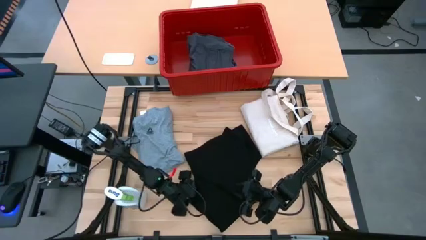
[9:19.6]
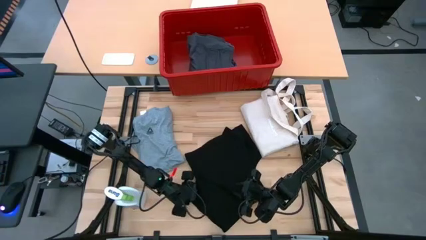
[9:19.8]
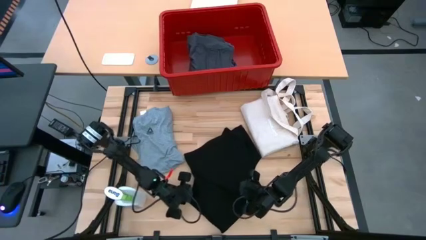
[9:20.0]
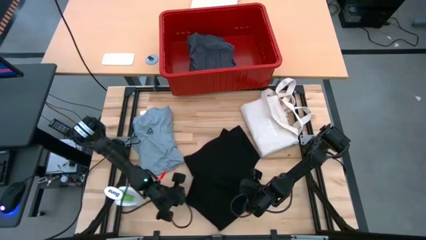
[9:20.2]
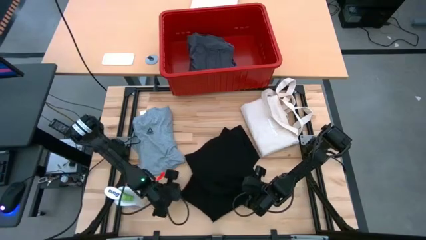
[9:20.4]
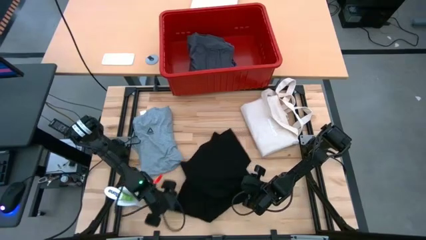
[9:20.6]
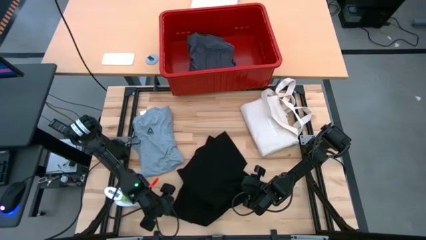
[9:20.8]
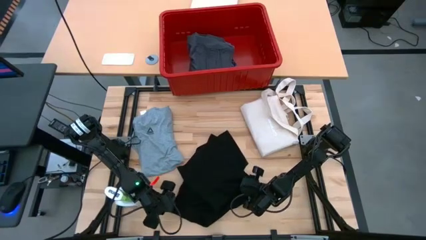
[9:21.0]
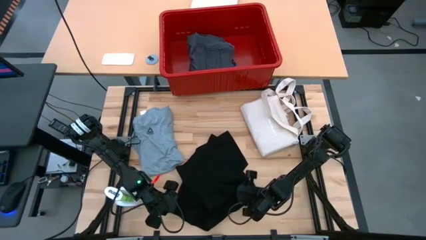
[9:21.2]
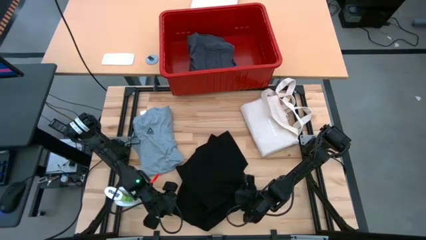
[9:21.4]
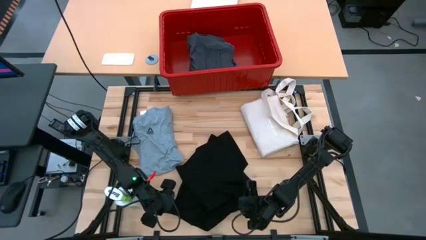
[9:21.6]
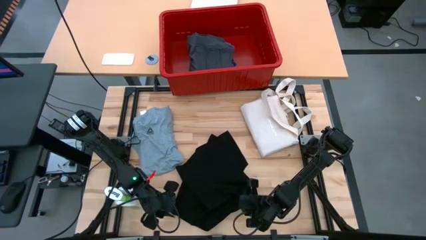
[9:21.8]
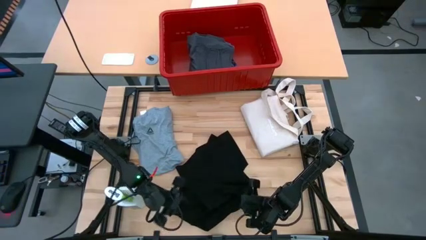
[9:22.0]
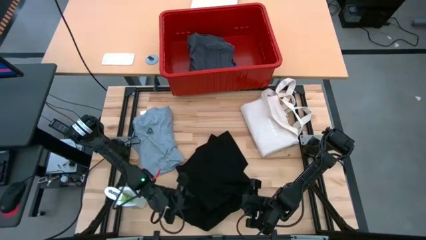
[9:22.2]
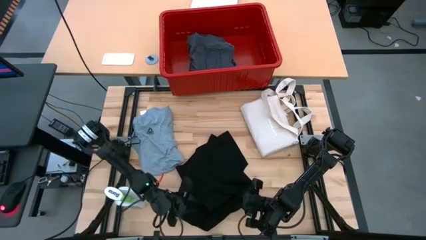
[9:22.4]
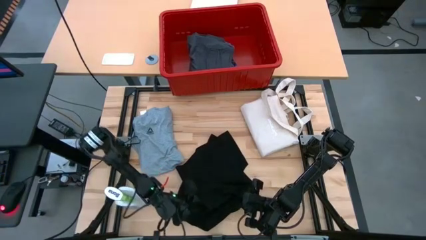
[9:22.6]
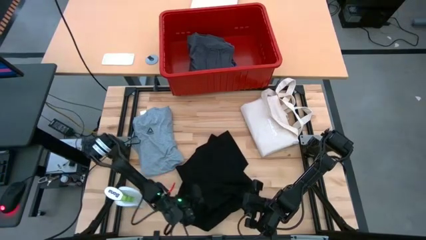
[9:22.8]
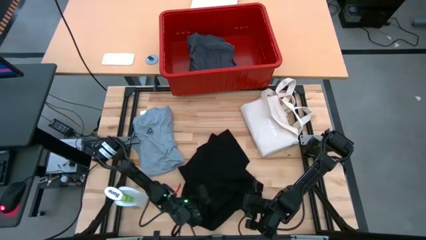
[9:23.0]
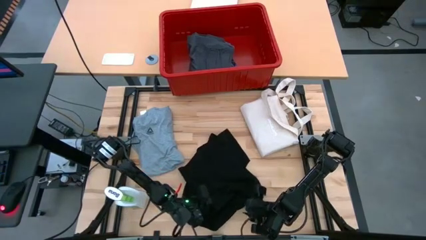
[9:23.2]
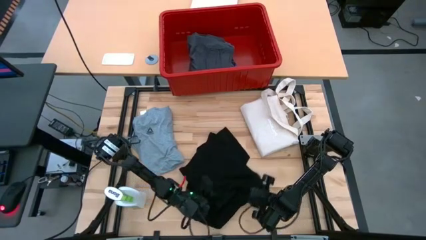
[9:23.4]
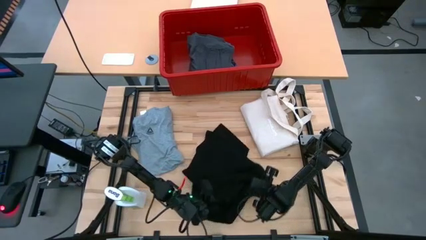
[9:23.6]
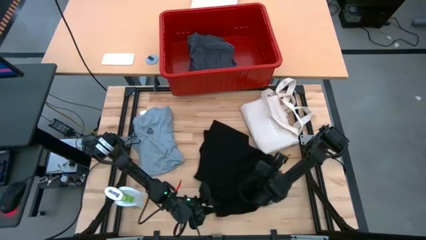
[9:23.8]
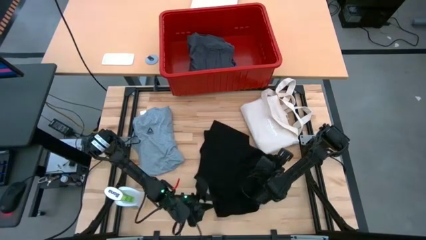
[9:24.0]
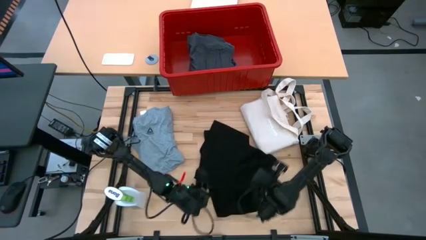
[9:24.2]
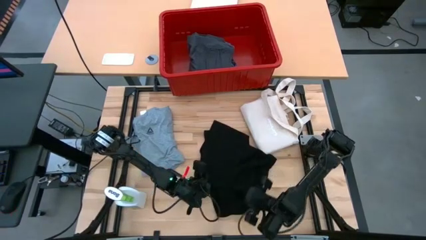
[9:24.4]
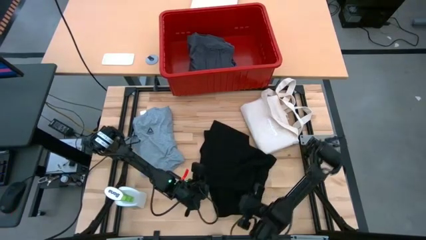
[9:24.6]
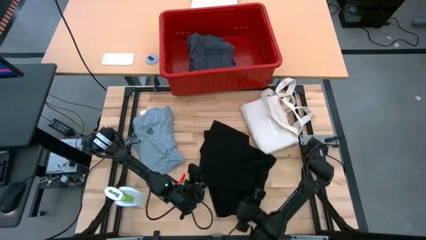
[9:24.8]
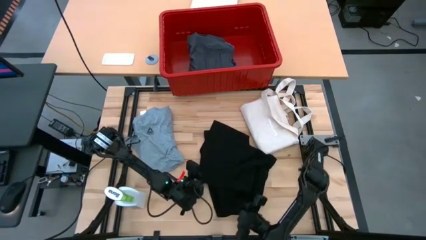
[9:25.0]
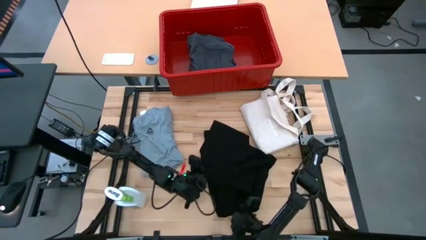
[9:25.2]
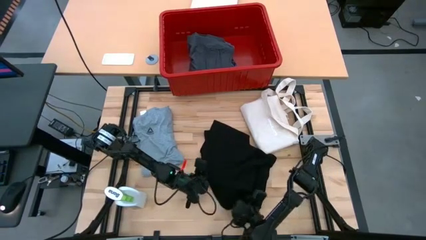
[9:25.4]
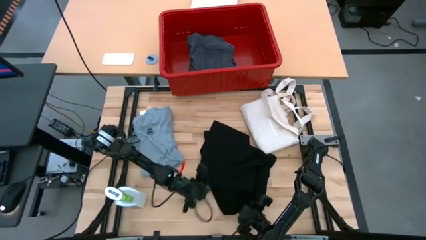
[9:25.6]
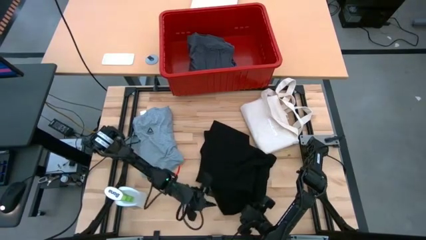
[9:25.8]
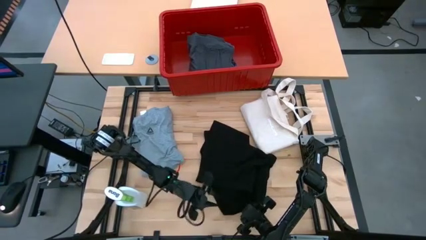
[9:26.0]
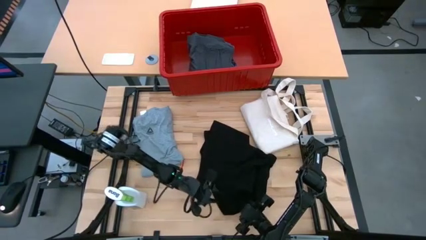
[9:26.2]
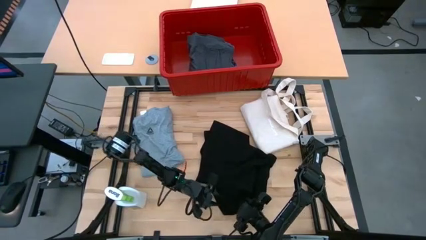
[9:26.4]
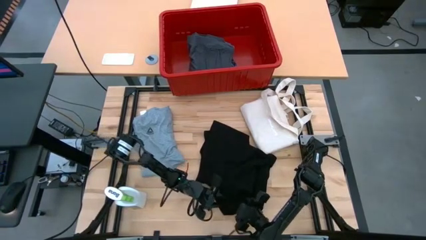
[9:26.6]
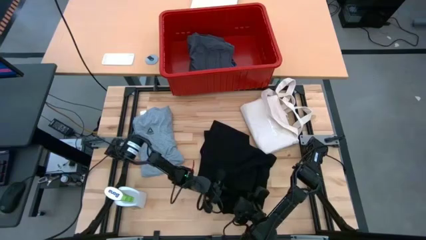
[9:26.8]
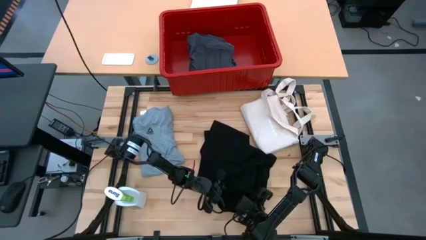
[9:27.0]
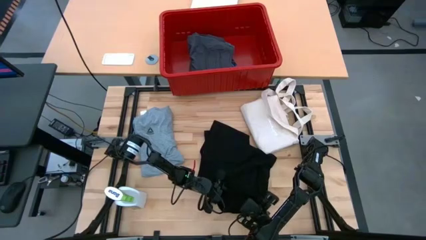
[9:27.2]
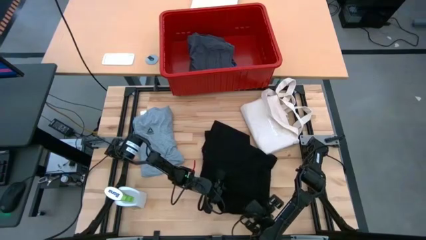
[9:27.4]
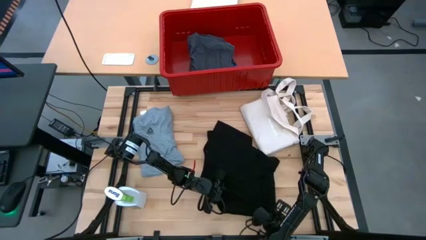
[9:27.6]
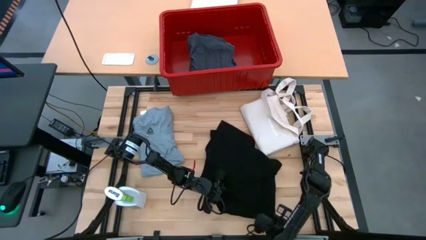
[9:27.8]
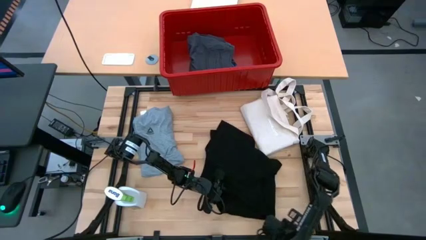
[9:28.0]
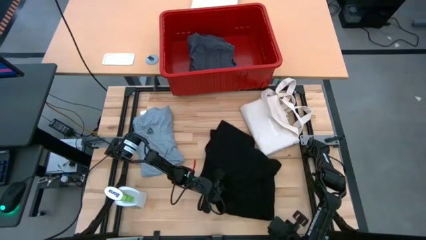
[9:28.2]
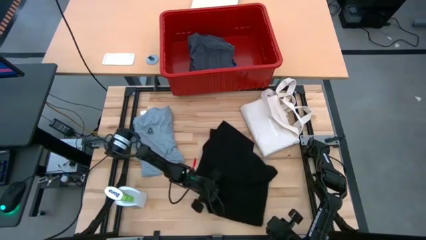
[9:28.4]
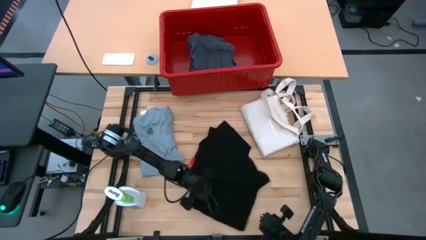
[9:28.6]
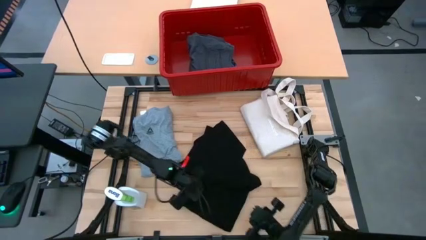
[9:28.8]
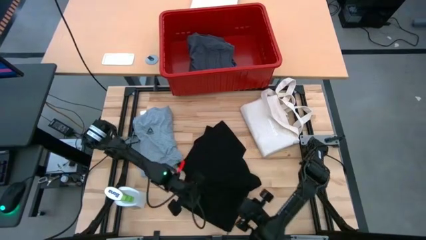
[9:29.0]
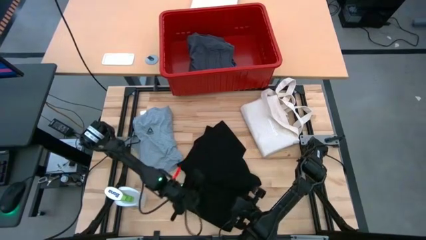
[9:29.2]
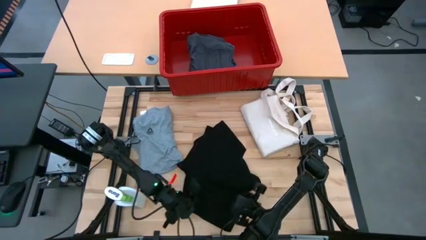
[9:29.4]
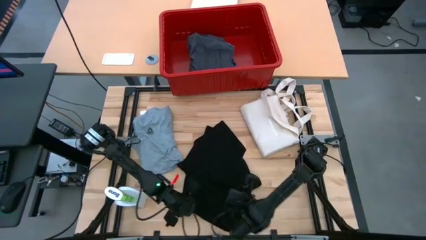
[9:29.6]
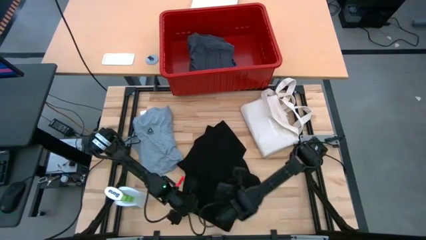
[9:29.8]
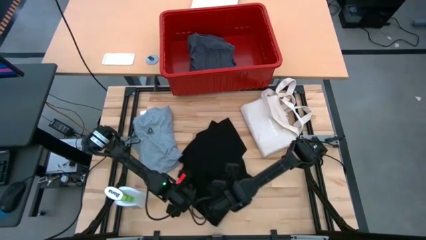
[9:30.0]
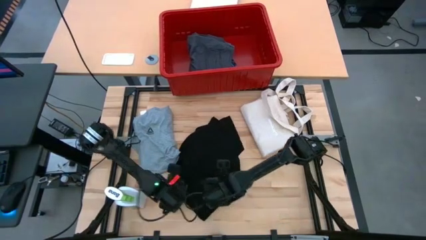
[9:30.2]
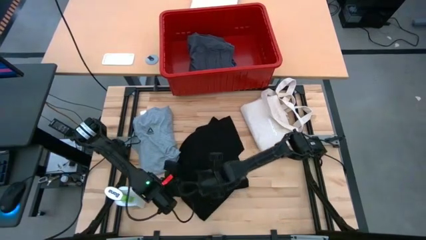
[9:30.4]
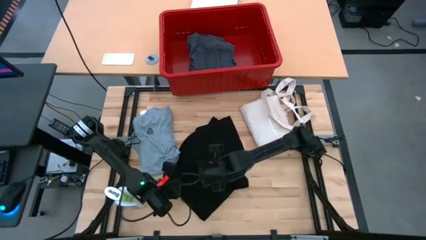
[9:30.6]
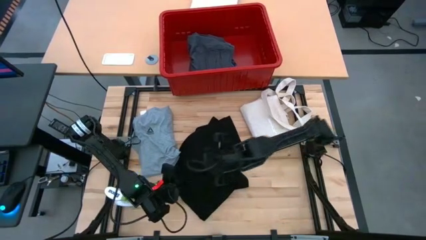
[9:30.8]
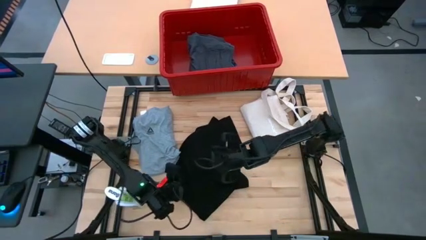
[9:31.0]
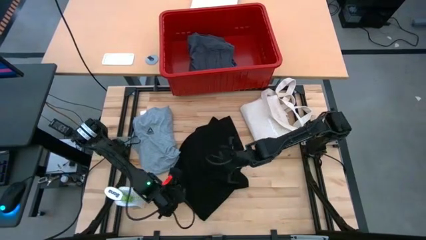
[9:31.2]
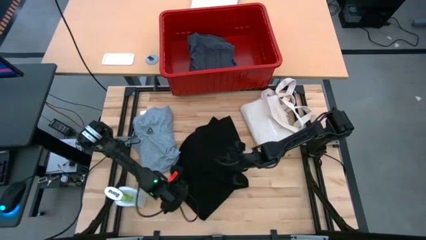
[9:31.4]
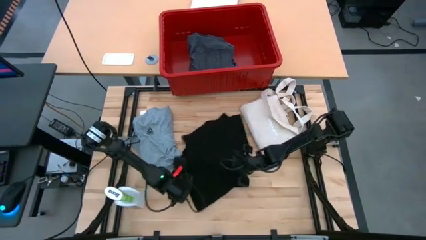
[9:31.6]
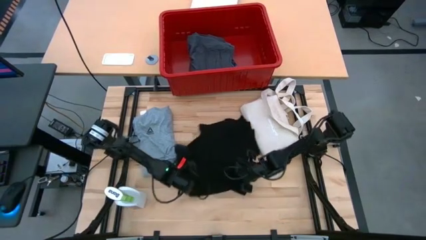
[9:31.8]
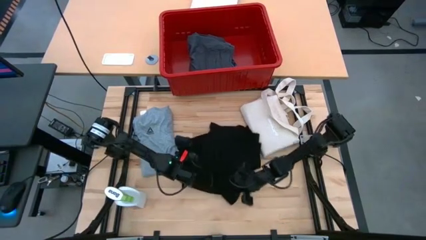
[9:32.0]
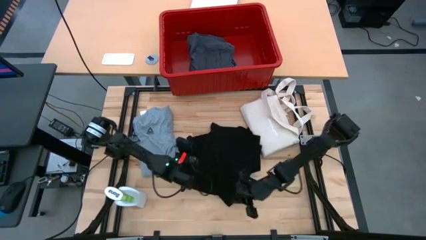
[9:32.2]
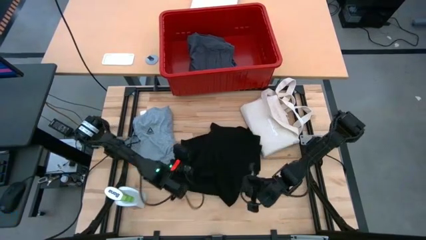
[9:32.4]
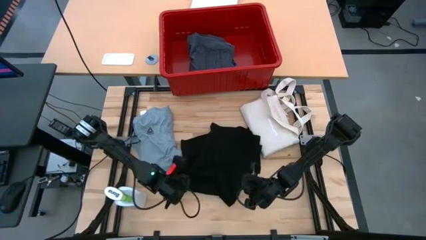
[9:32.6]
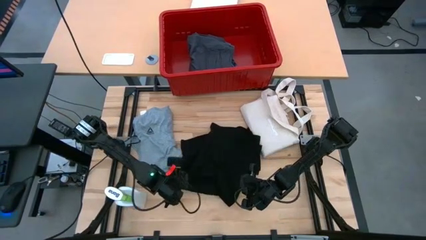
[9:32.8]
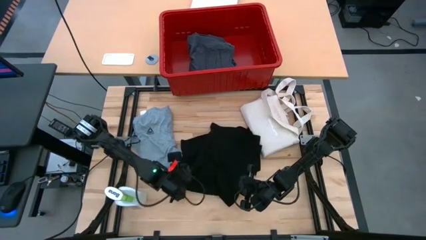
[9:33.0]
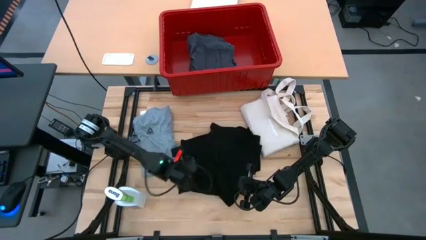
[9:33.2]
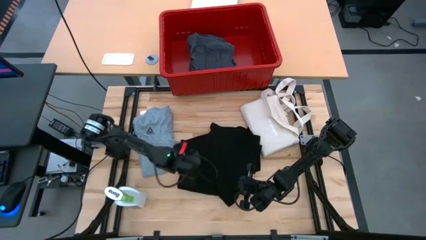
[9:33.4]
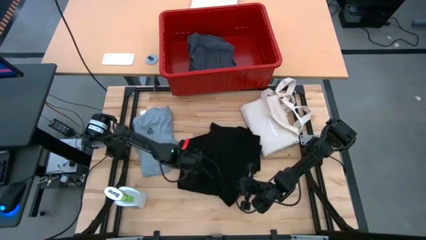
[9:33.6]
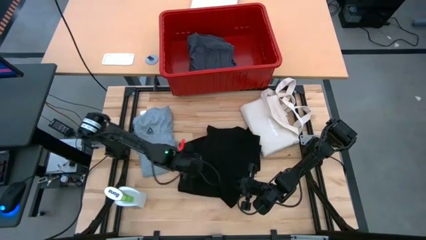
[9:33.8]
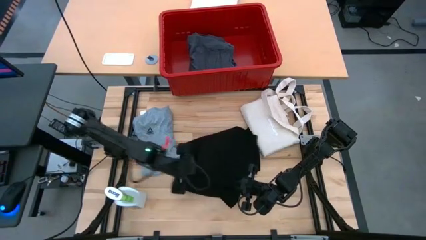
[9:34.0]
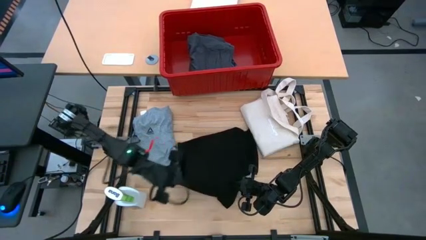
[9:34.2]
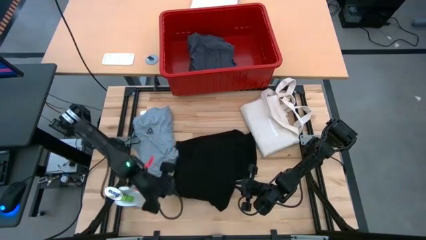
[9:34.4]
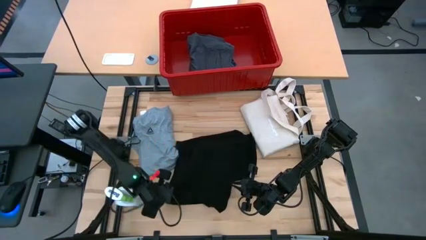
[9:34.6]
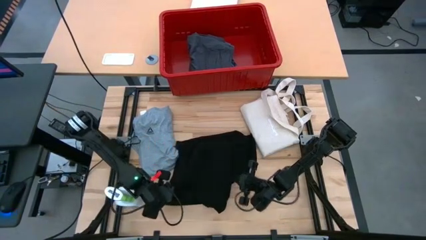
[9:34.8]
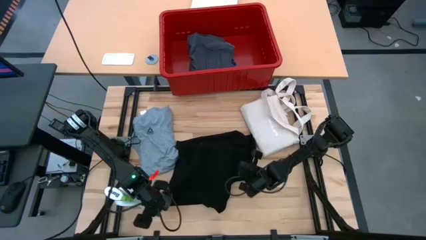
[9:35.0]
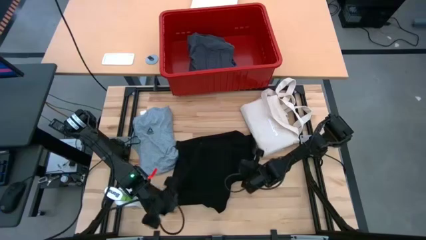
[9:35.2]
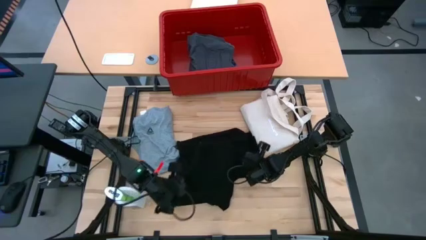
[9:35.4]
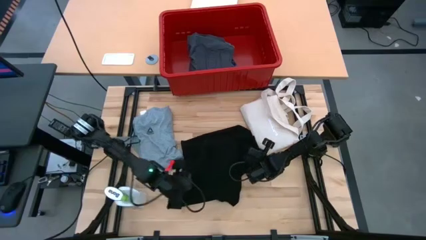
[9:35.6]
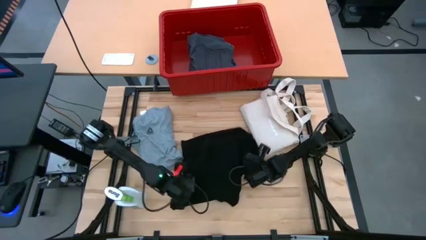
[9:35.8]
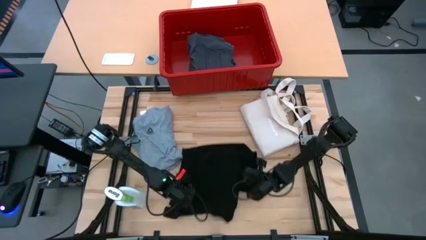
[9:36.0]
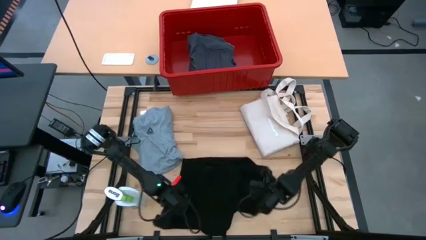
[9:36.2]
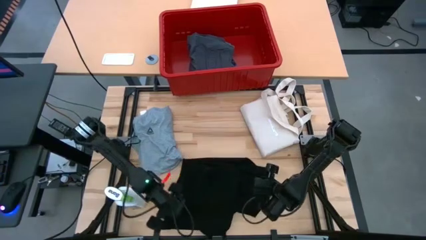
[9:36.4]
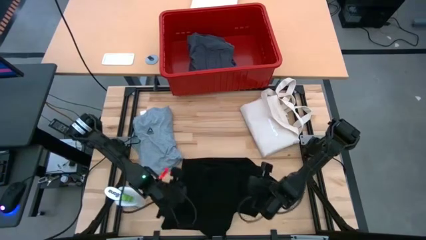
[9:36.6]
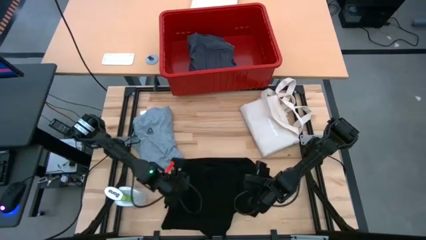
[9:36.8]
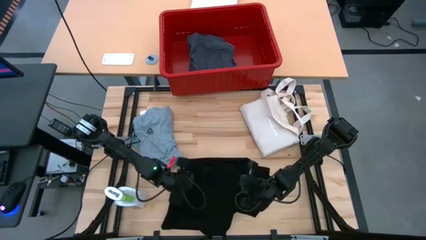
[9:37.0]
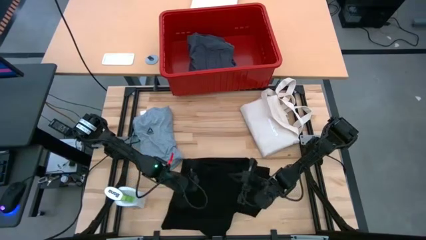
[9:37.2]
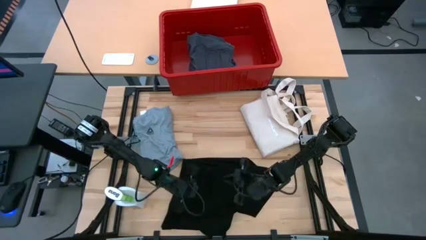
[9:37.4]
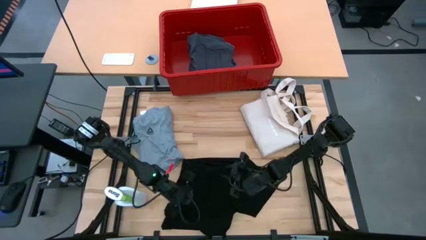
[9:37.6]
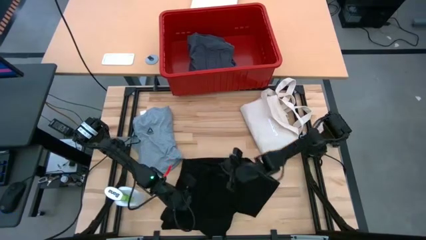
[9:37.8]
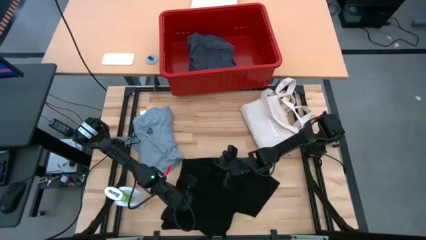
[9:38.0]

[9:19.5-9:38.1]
Task: Fold Laundry from Bin
Fold the black shirt
